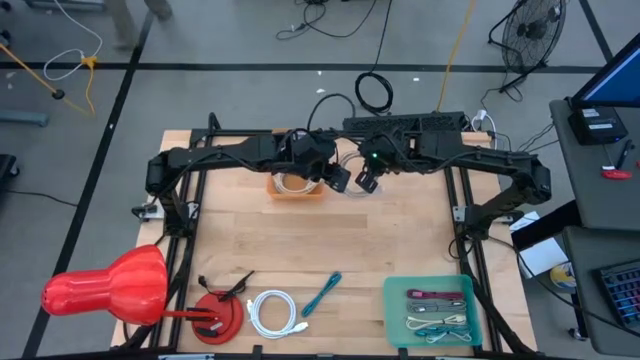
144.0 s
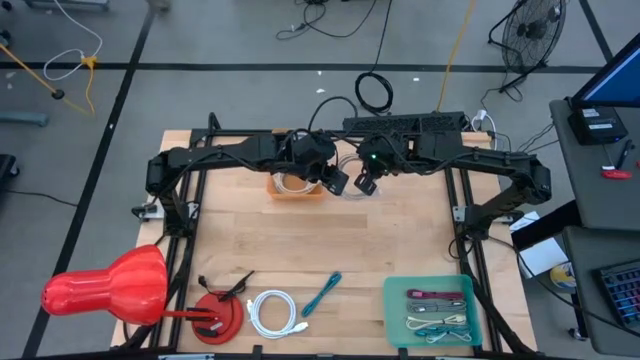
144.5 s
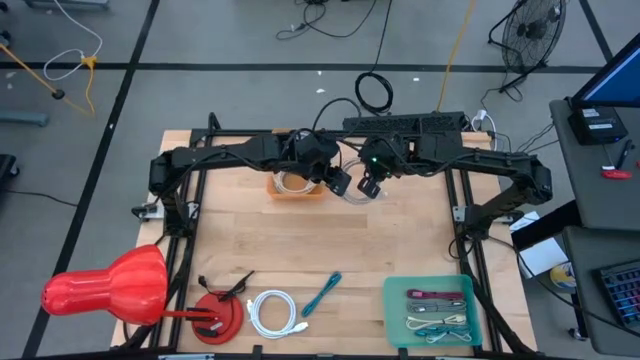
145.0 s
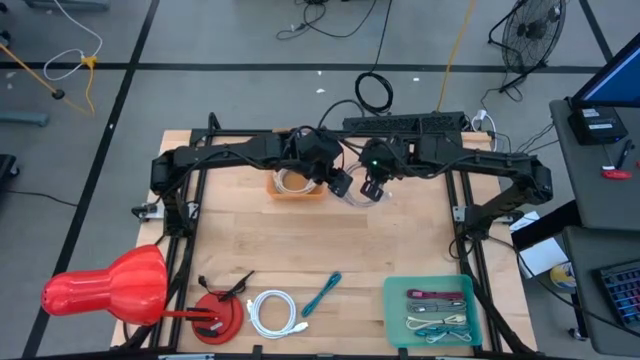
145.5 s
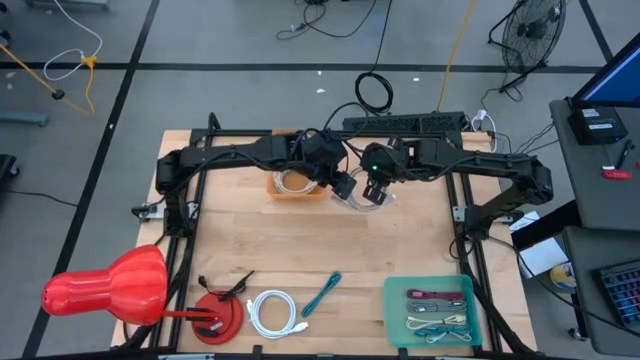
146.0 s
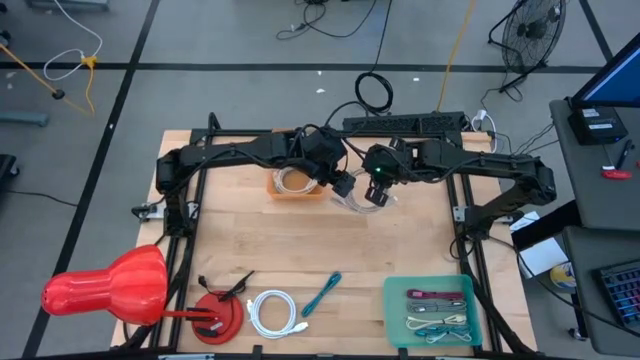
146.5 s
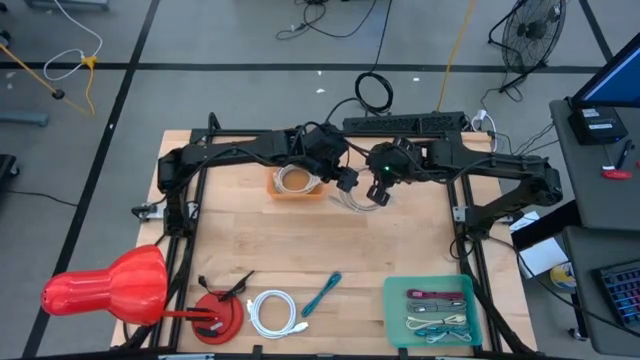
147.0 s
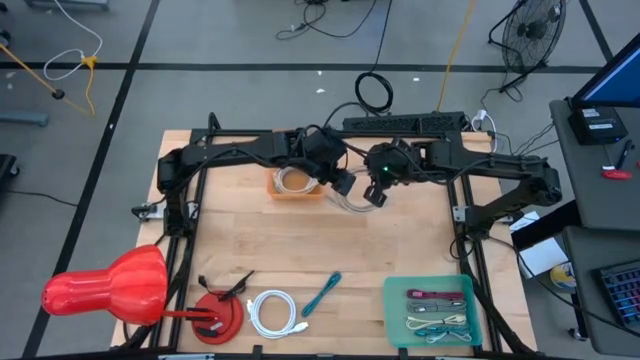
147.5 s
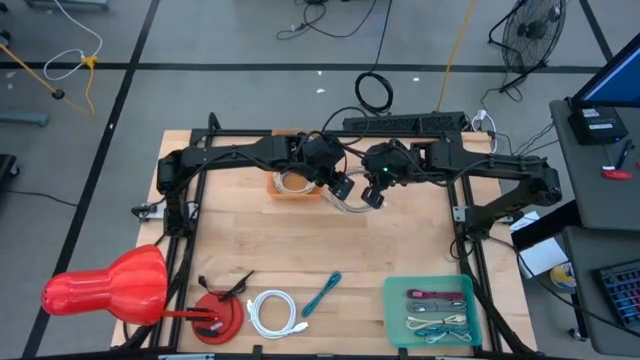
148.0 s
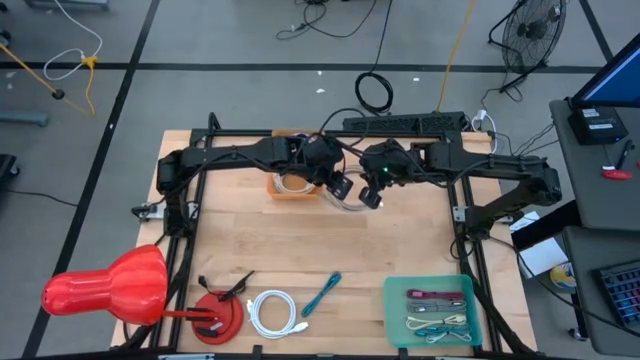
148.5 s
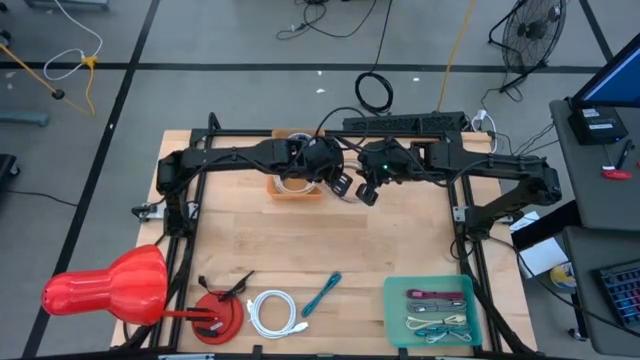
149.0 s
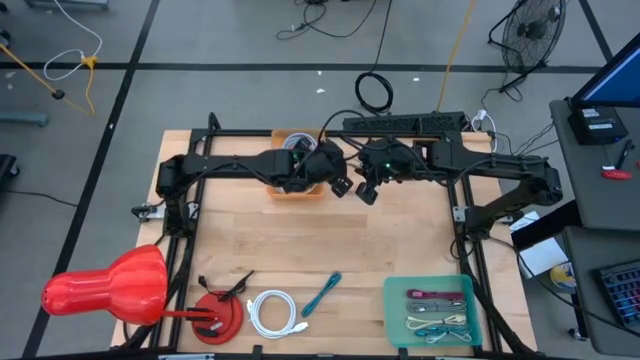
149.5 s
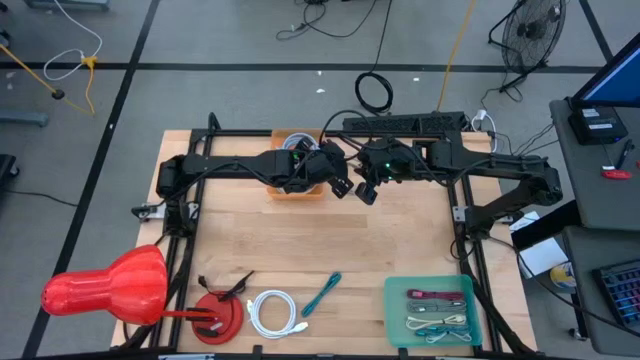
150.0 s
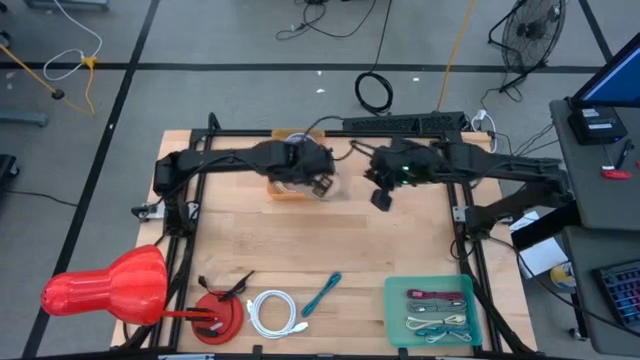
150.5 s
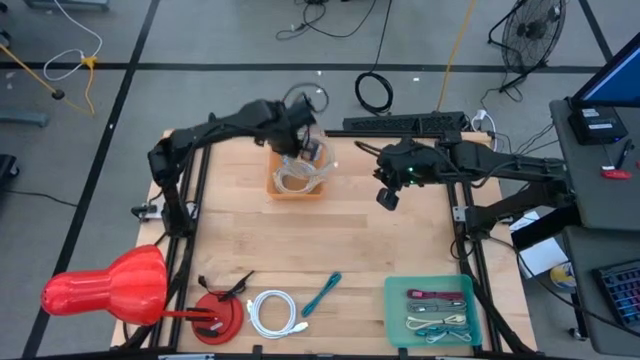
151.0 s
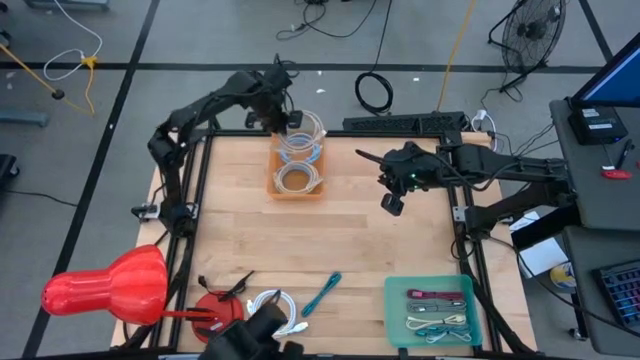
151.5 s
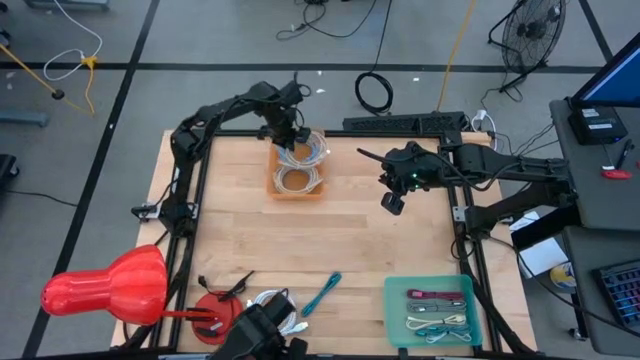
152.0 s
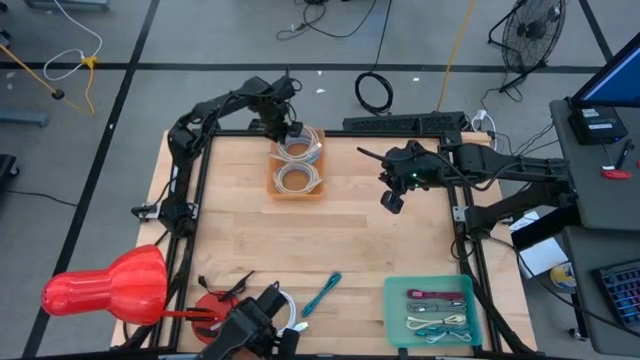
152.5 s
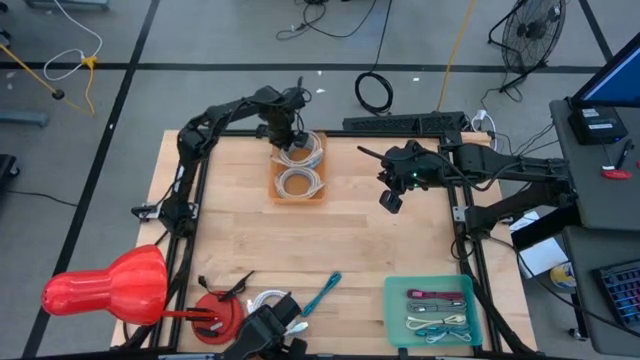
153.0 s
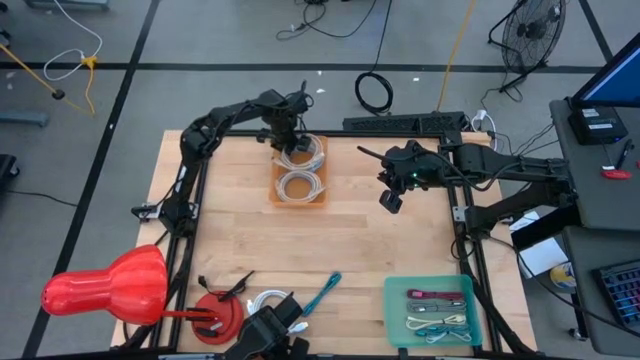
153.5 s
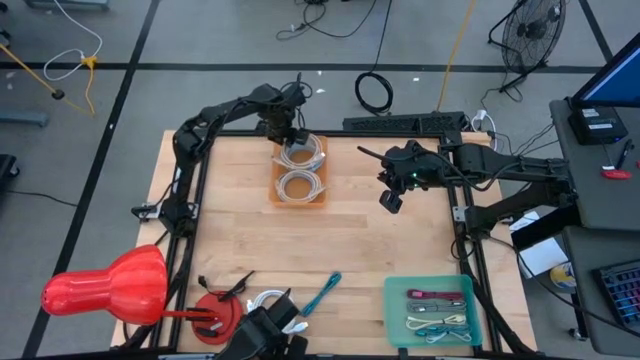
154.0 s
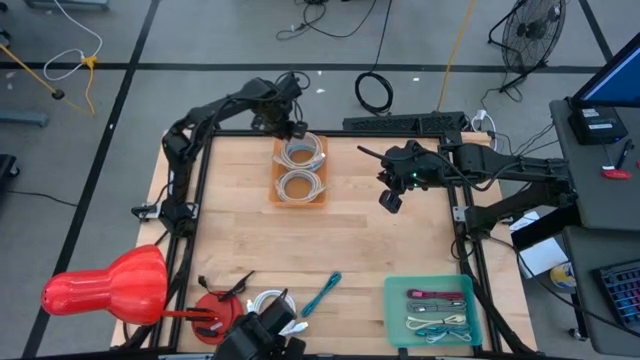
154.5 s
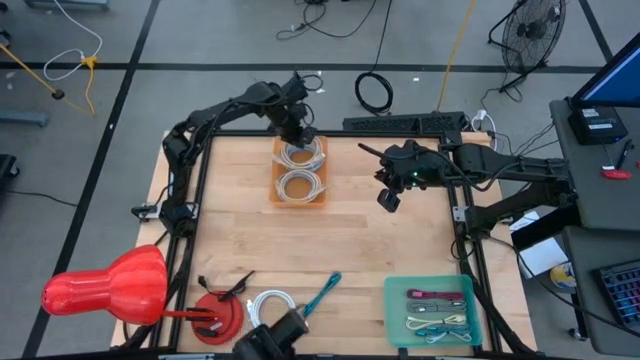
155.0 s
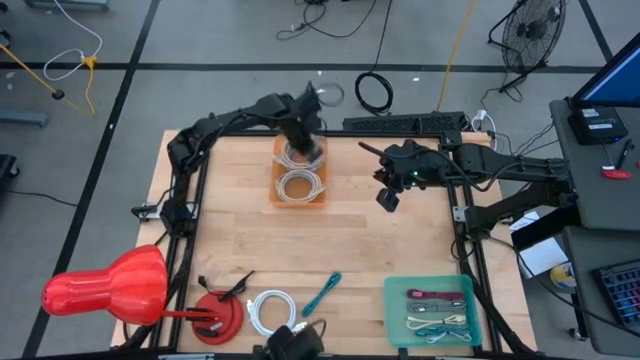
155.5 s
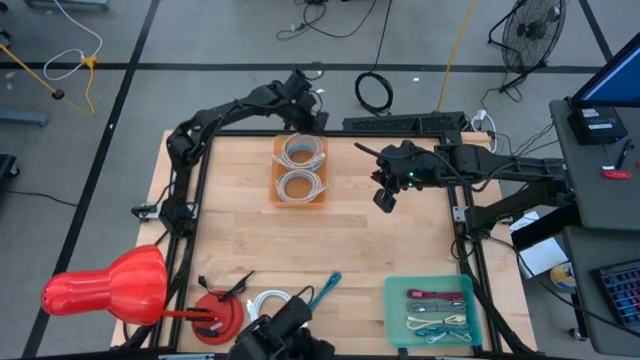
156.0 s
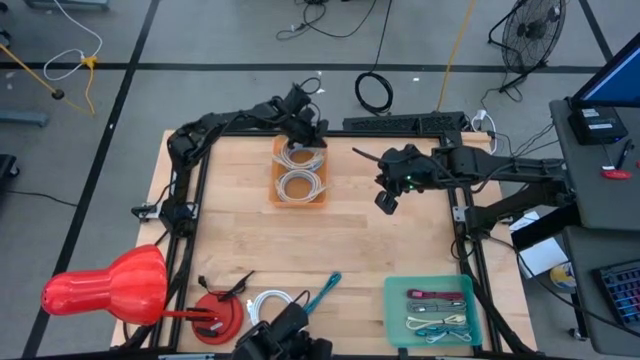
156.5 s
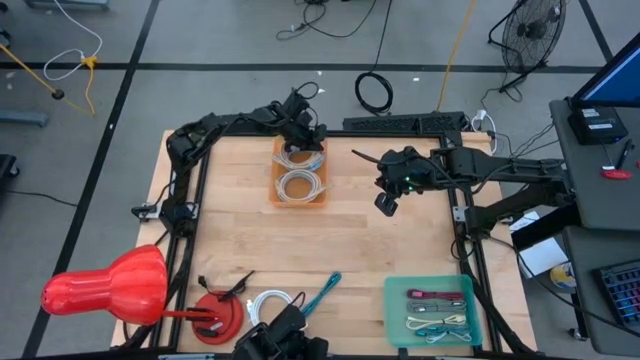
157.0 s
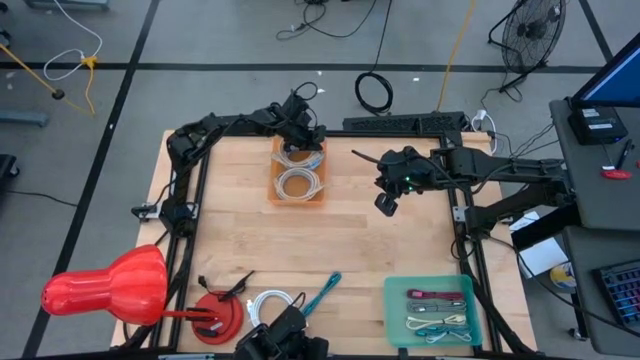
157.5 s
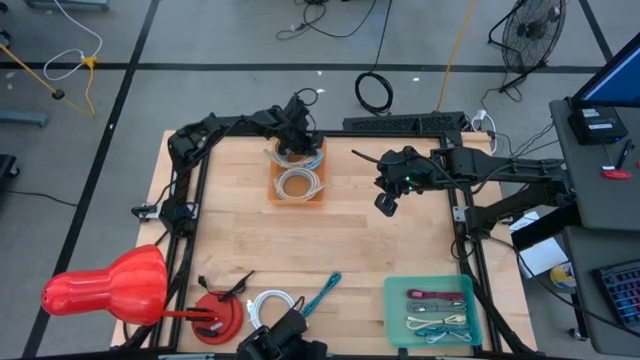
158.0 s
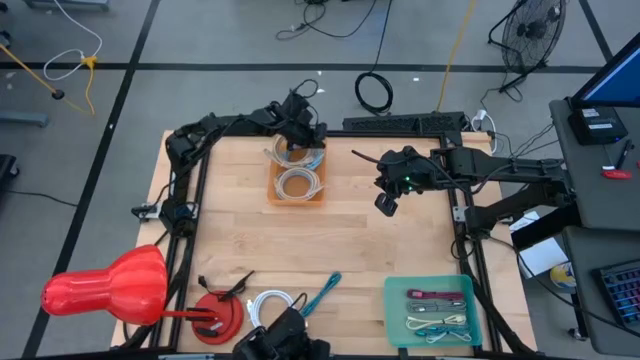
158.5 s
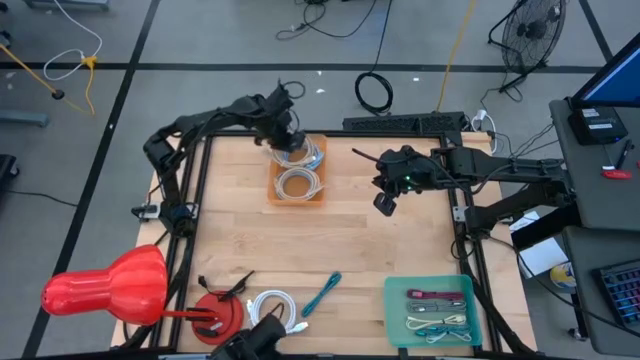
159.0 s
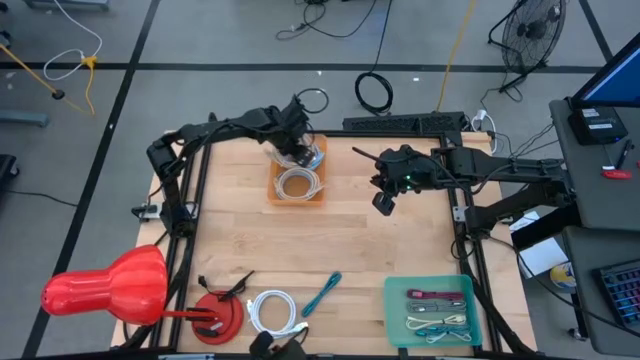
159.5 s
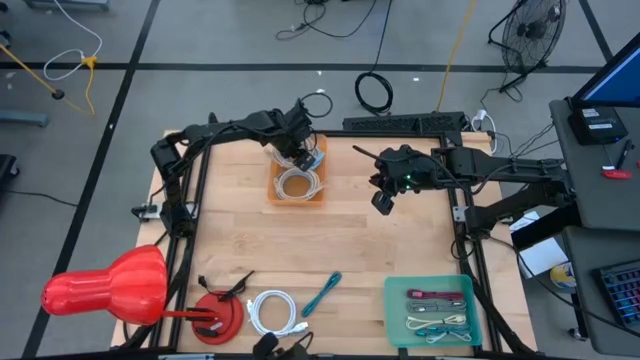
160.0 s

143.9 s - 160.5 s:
Task: Pick & Place USB Port
Put the brown usb cable into the orange bin
